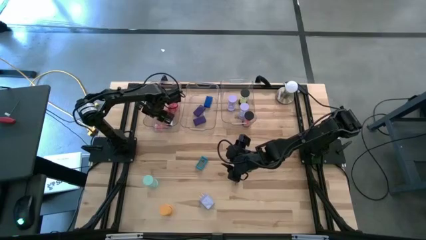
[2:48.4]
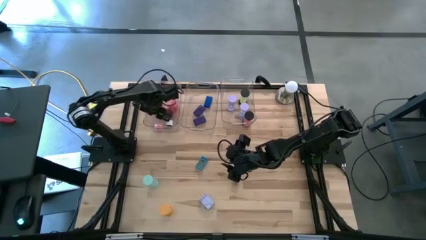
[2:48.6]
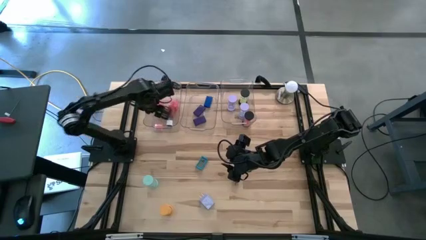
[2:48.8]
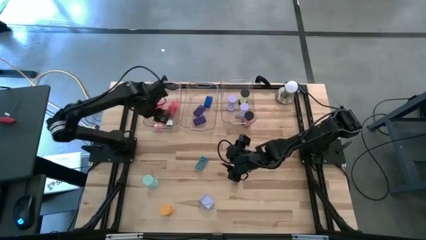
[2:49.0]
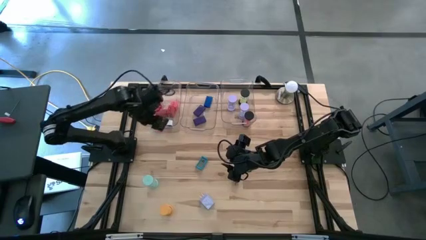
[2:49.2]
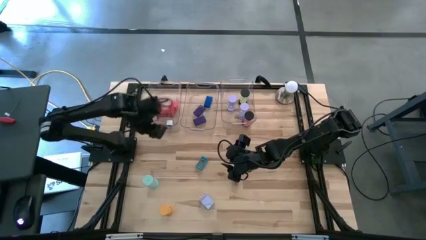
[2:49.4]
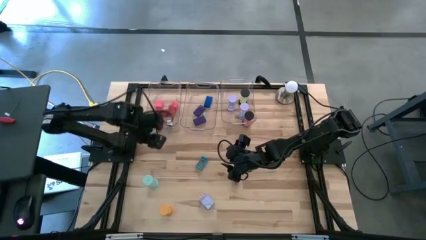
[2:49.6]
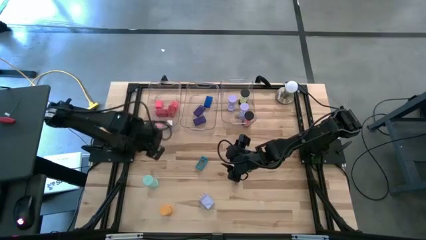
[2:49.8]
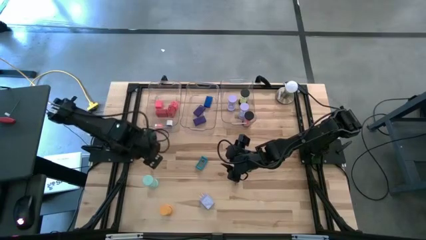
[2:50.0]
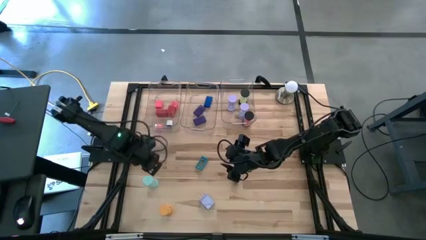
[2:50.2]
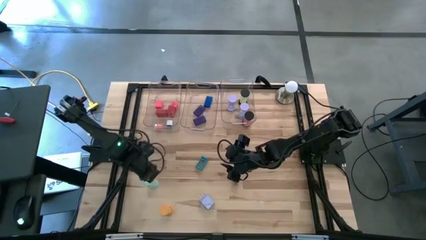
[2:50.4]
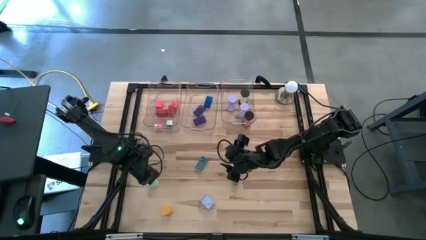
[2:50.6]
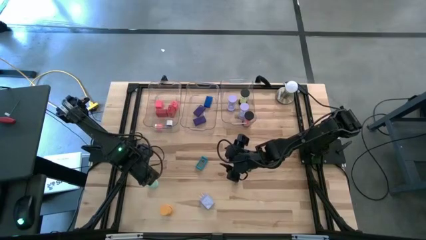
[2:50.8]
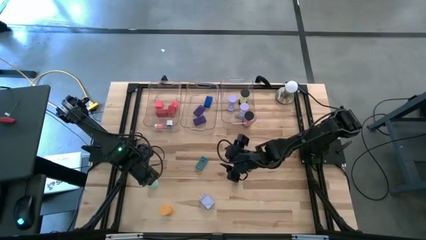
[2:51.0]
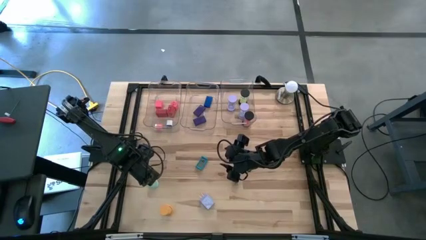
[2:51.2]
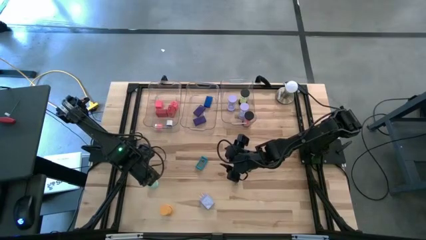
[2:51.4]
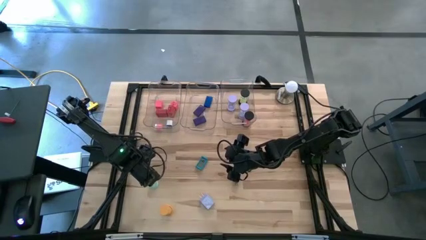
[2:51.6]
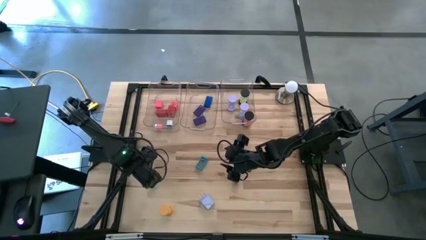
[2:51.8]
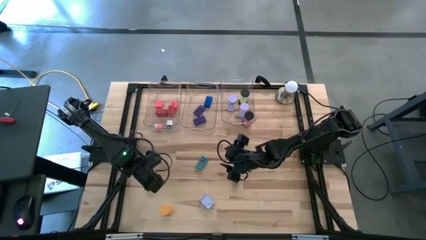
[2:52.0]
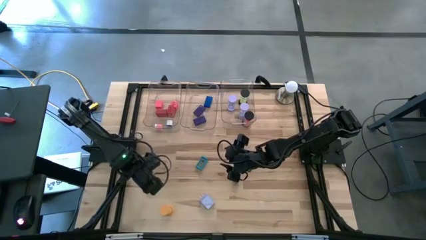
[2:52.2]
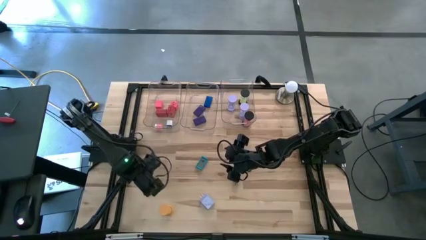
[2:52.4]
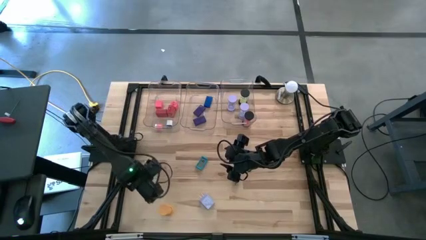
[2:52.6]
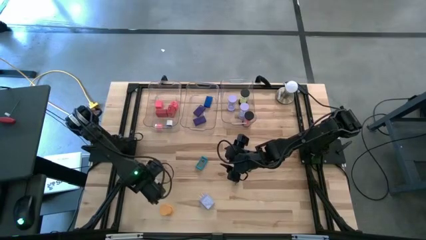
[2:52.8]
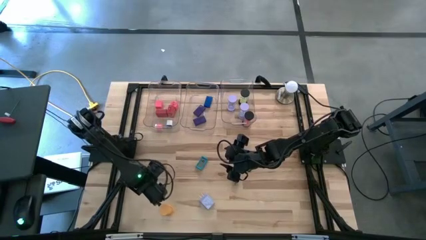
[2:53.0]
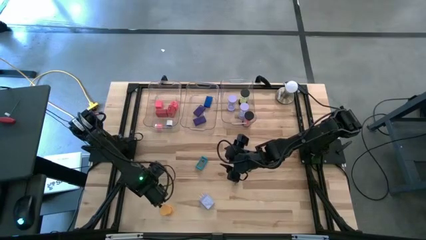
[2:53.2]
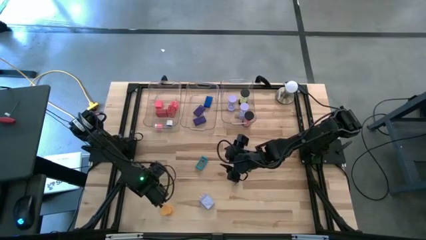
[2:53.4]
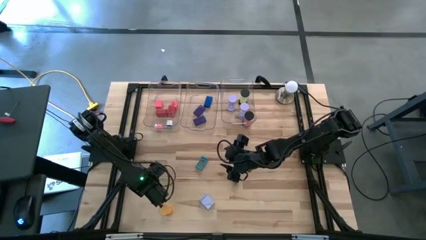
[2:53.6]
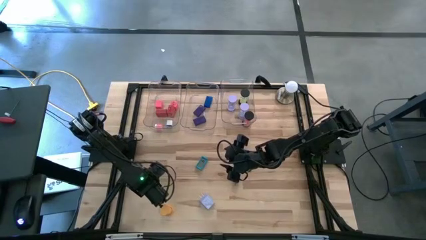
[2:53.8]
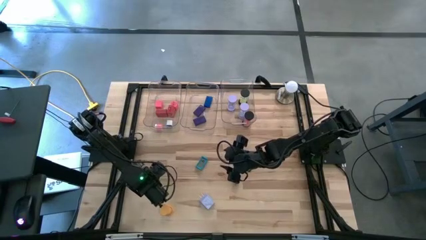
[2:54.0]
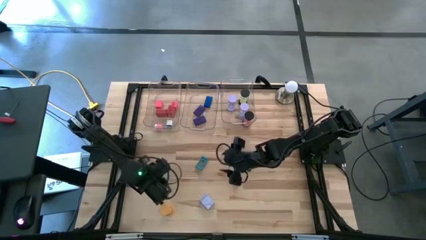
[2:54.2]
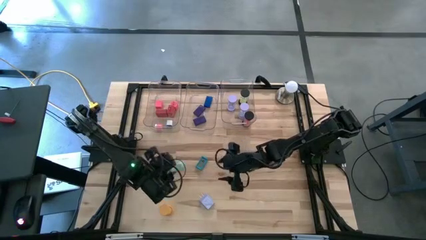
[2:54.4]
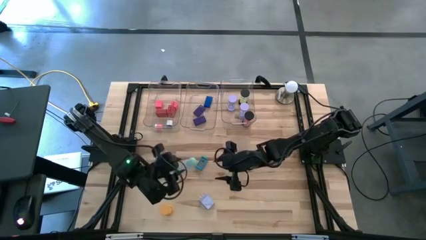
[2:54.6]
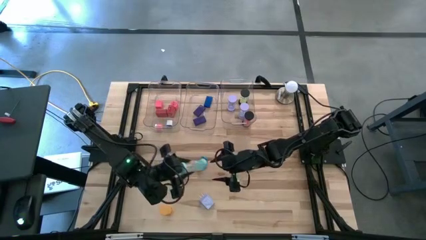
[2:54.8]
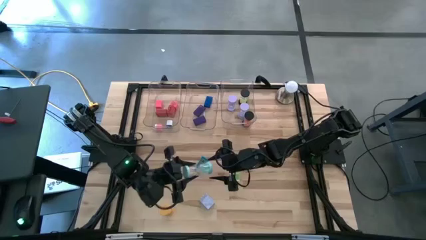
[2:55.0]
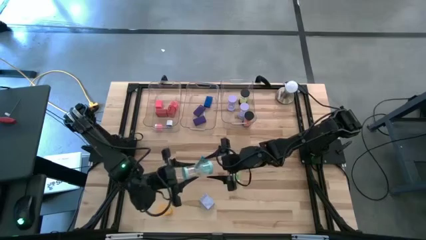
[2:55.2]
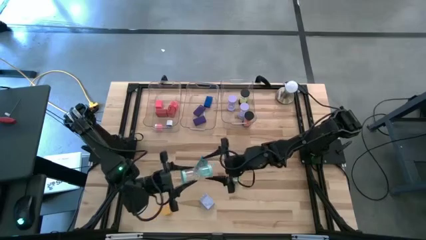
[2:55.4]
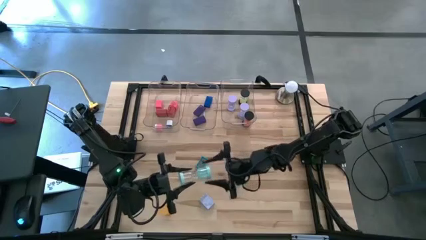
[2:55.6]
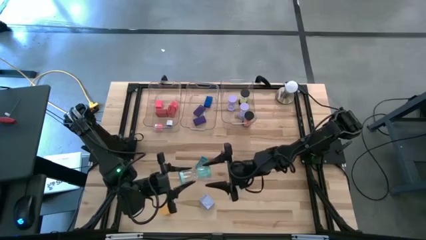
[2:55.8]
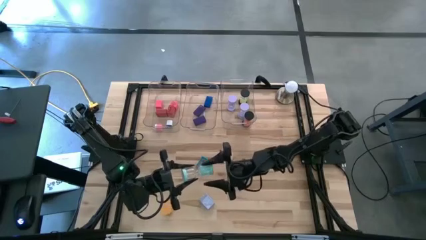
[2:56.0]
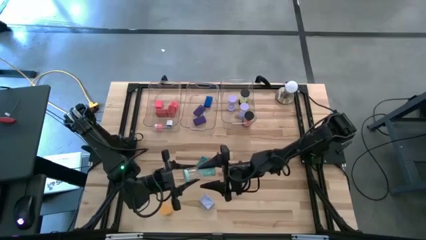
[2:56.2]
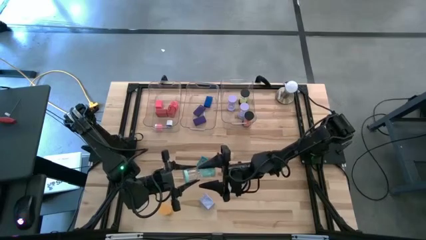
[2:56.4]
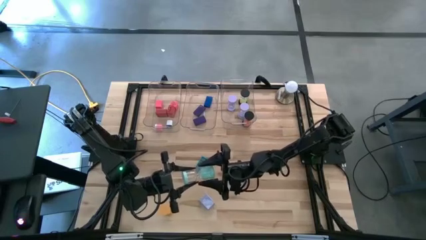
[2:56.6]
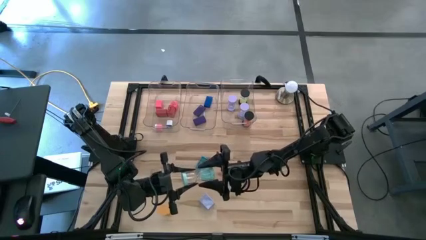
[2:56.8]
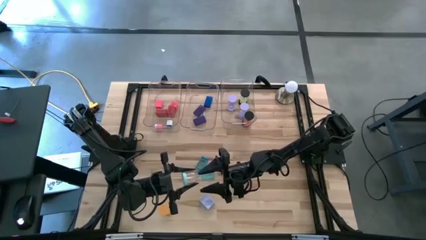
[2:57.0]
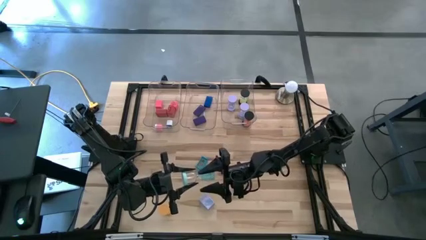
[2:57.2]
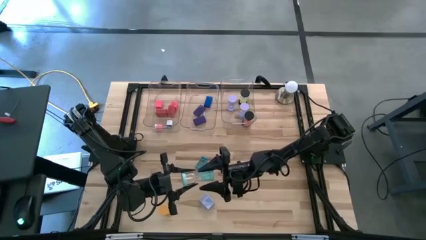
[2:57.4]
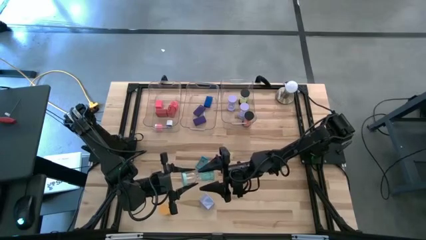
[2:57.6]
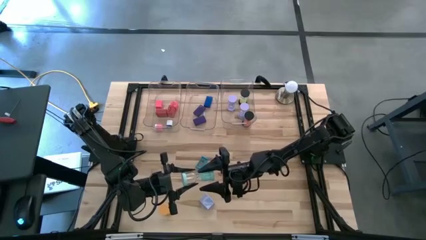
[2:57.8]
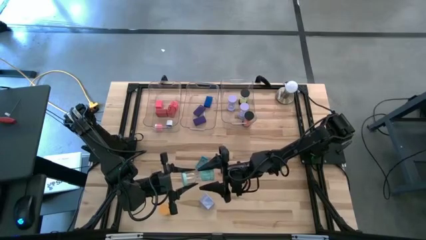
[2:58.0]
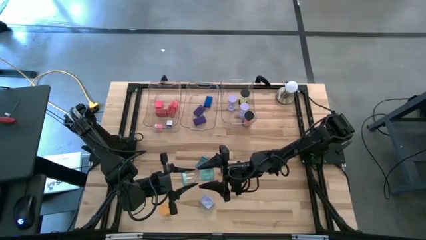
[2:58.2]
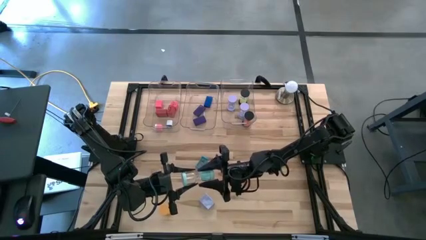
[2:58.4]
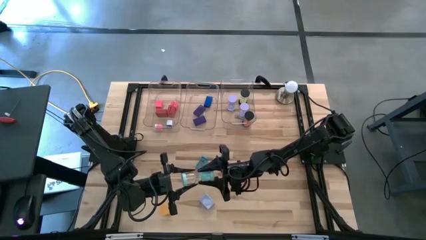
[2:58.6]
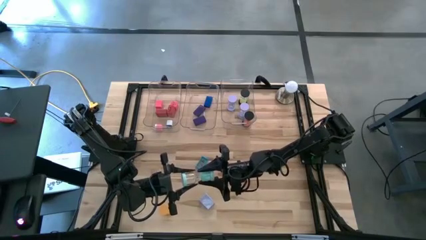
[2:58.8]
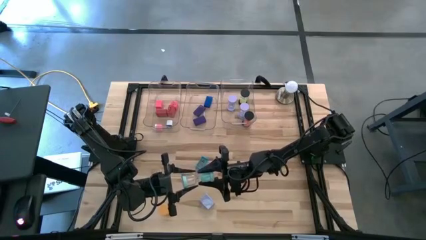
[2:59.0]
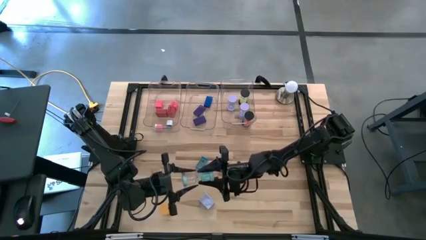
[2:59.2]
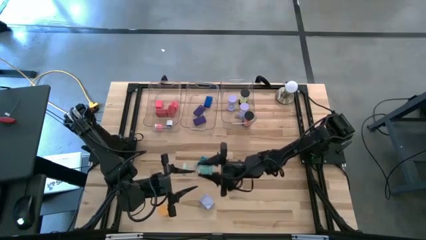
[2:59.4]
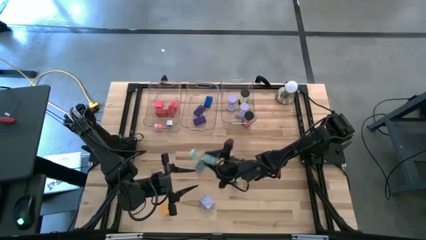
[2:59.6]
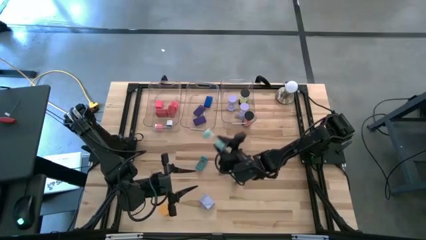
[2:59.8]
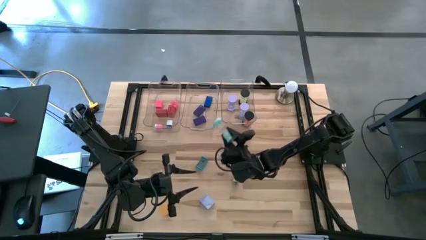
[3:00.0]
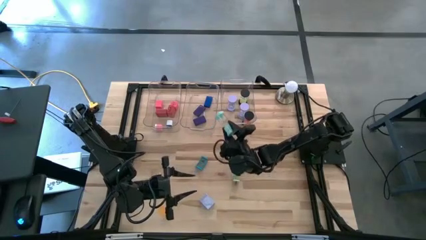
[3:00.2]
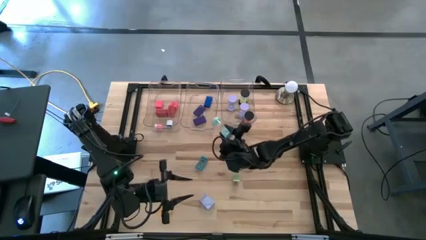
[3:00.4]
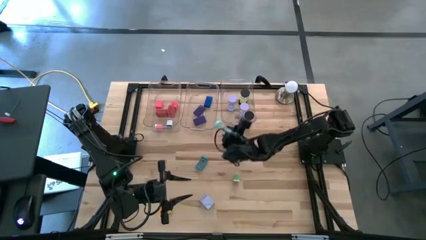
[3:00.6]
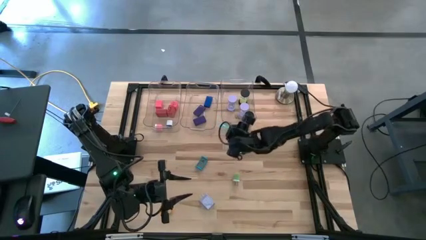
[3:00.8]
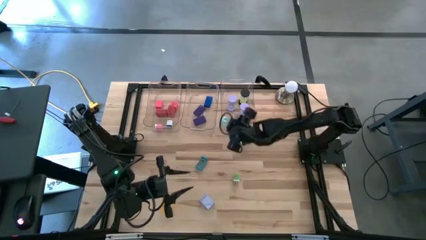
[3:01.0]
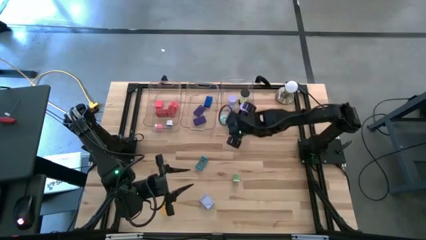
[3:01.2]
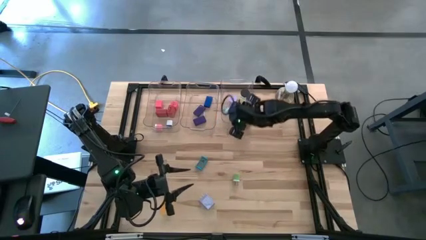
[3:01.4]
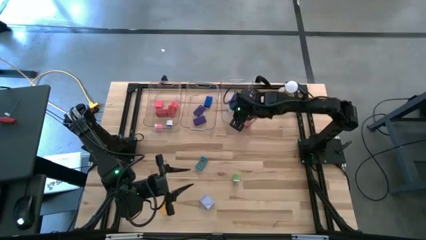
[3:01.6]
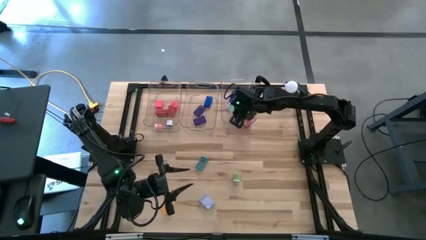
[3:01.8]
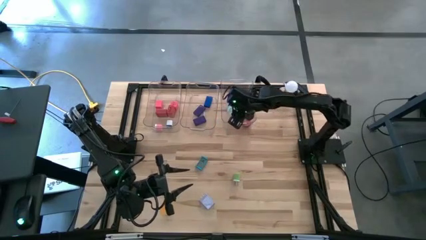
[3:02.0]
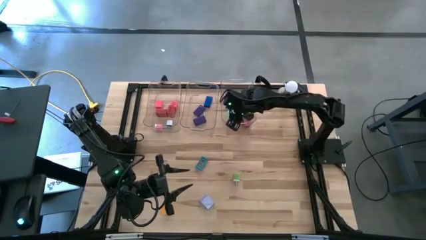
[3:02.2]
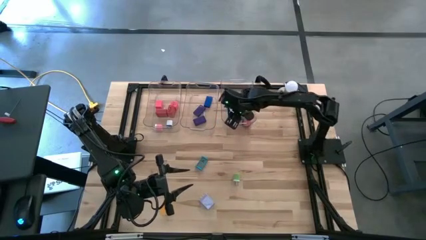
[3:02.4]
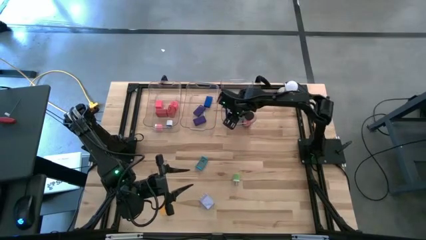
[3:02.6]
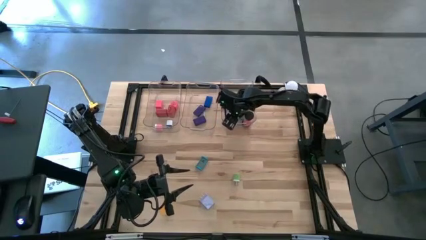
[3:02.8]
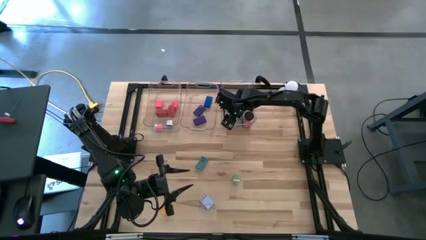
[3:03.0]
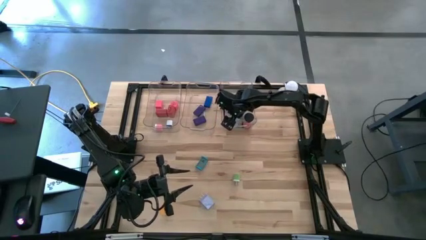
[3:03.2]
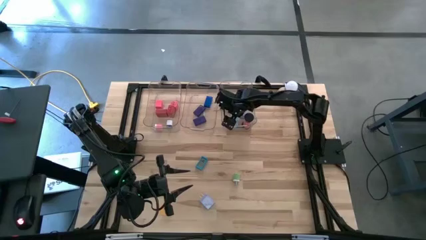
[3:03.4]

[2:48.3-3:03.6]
Task: Pick & Place Office items
Put the green hourglass into the right transparent bin

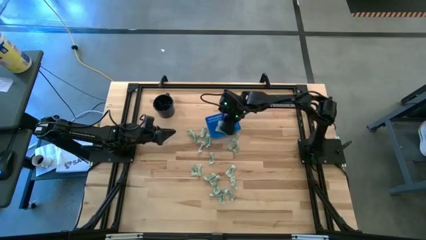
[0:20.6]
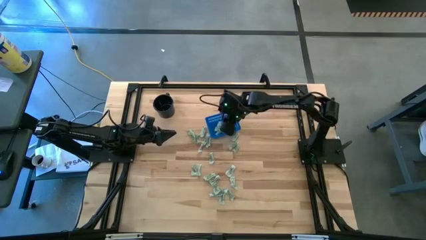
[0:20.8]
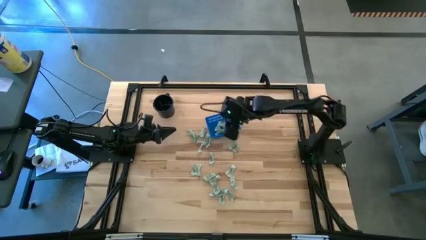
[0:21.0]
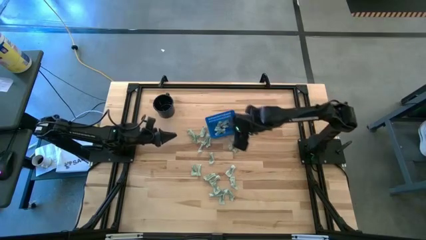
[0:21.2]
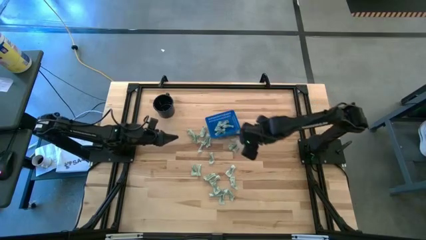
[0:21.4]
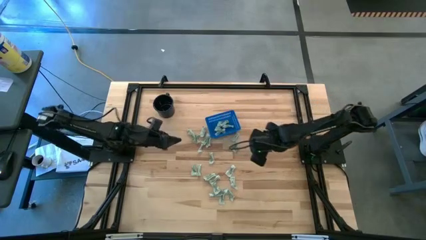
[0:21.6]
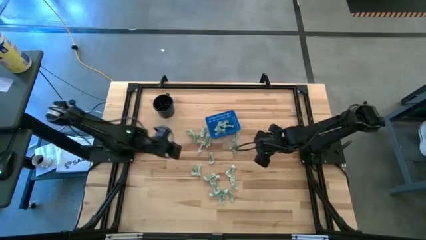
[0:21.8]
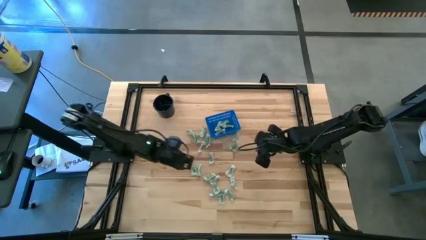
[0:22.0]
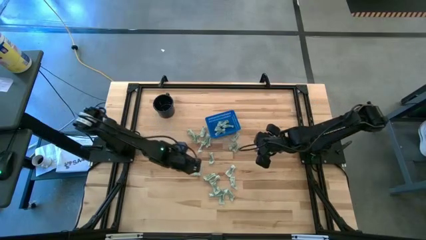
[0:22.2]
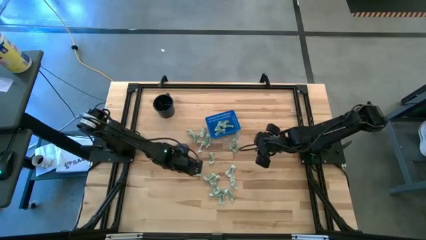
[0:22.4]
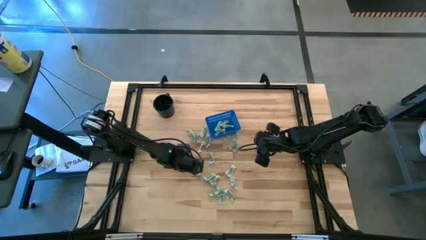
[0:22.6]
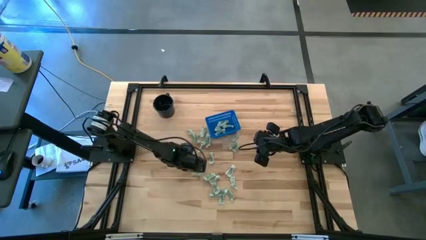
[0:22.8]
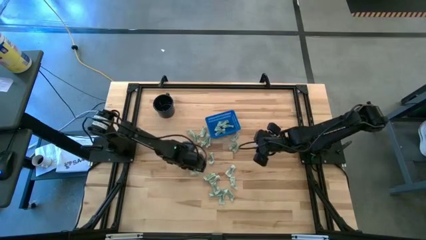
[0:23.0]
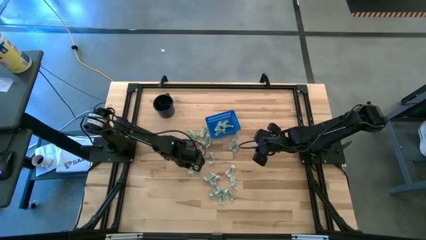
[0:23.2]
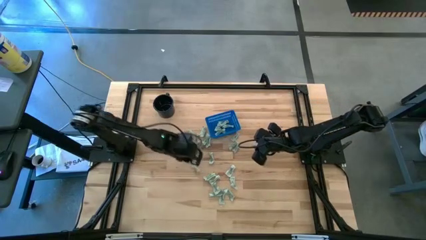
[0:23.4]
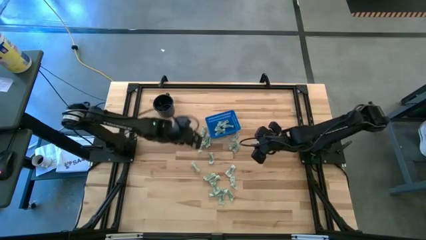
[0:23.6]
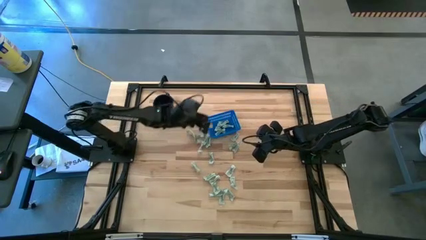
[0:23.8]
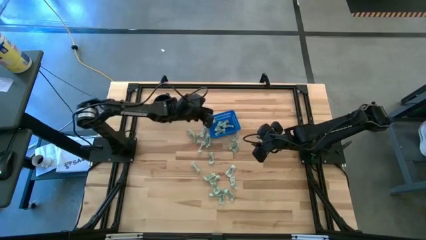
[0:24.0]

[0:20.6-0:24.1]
Task: Pick and place Stevia / Truvia into bins
Put the green stevia packet into the blue bin
